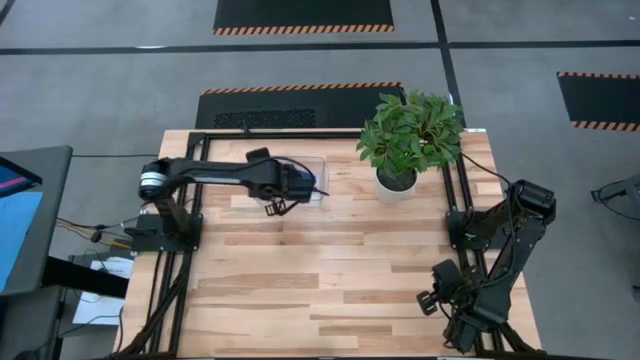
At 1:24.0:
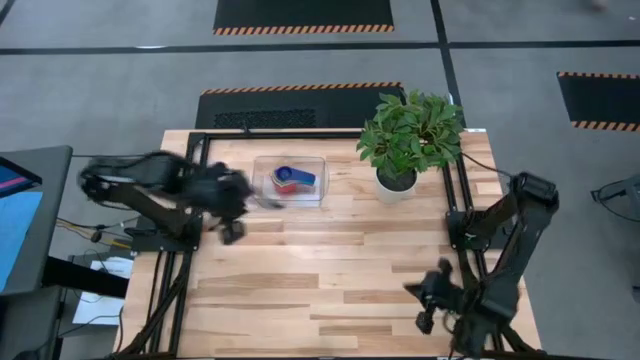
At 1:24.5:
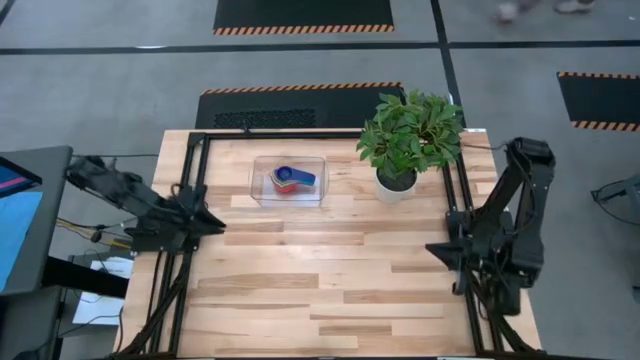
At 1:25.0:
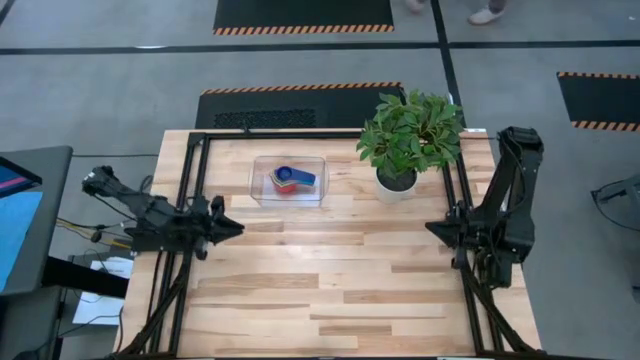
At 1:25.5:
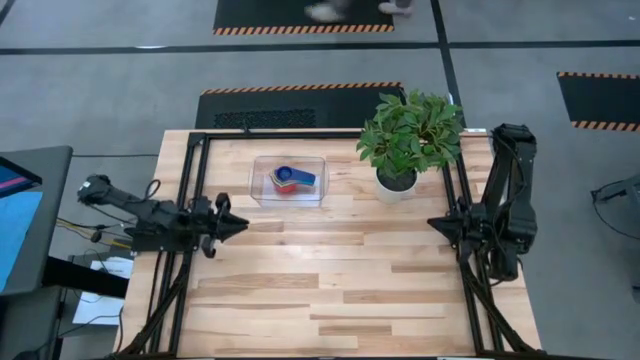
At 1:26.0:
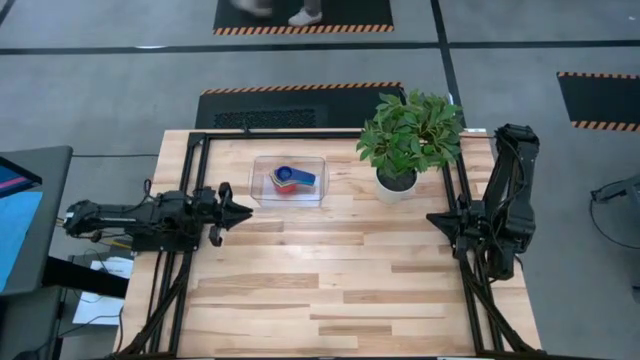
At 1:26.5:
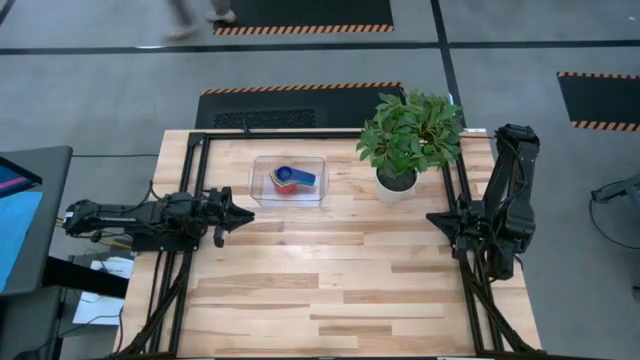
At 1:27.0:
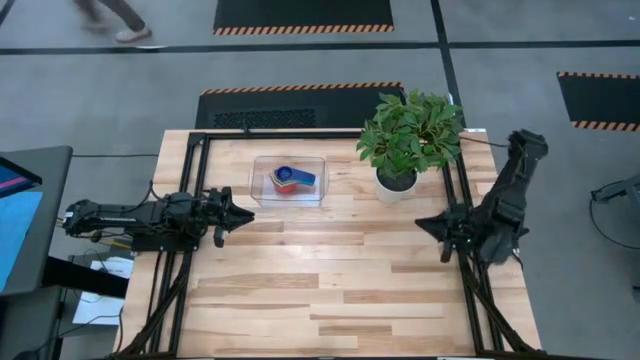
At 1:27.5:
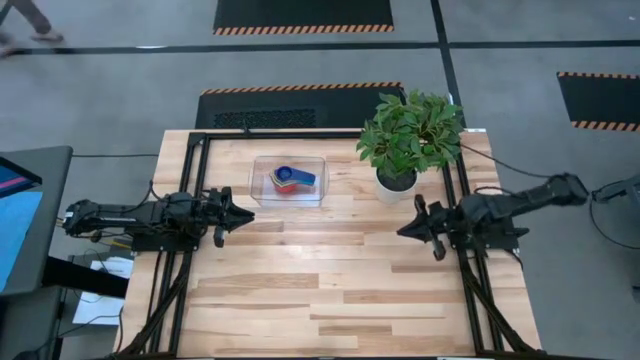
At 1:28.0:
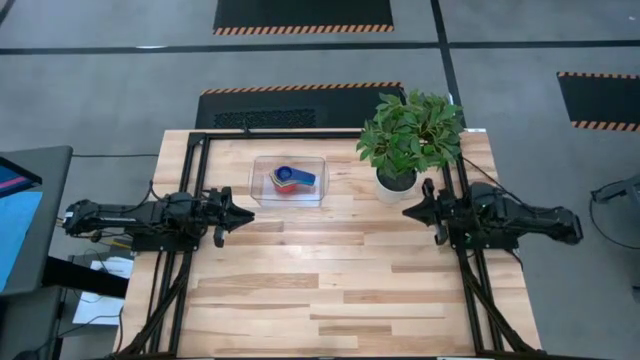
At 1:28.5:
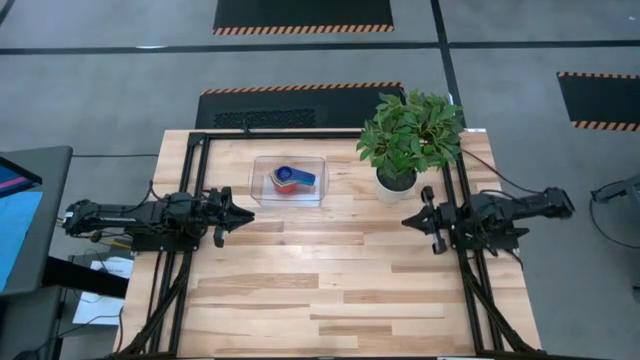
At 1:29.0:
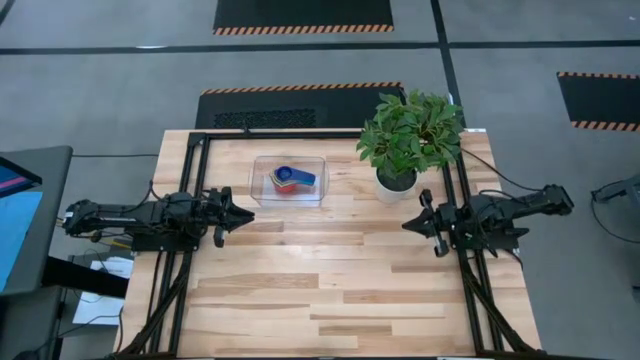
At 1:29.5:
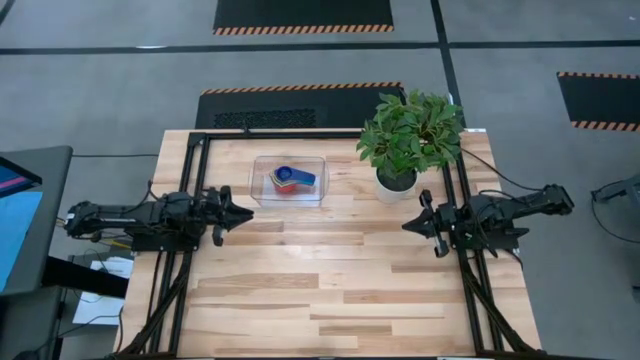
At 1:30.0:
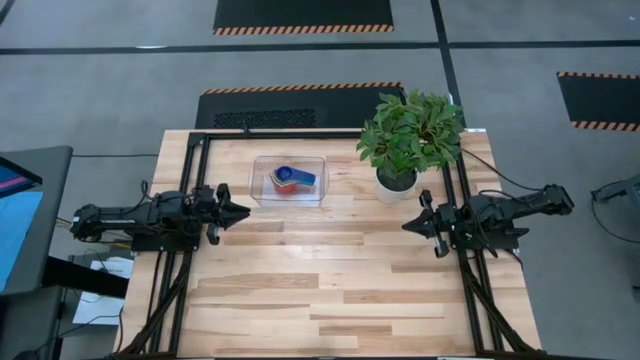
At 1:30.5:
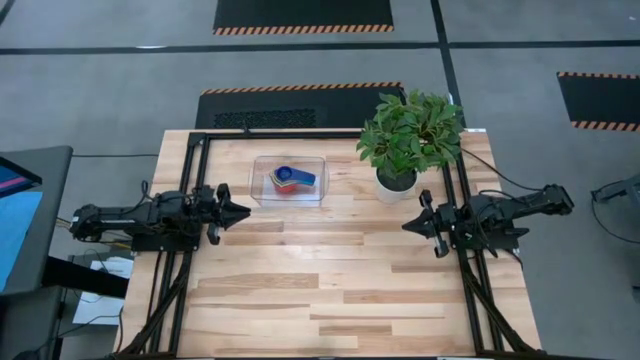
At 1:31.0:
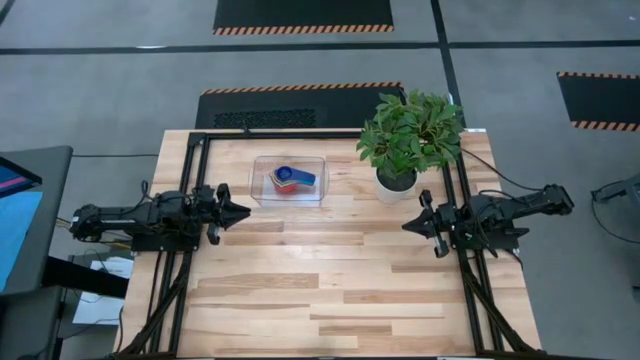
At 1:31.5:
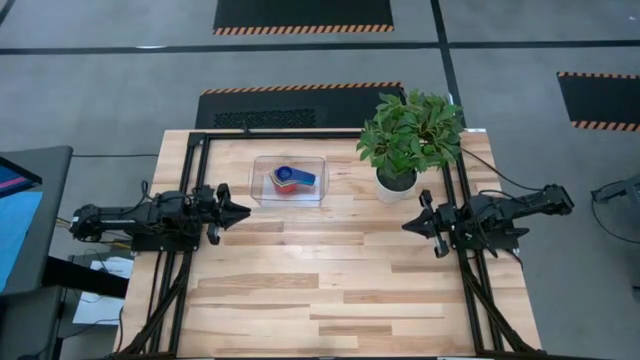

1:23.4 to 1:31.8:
Task: Nest measuring cups in basket
Return to Home Position

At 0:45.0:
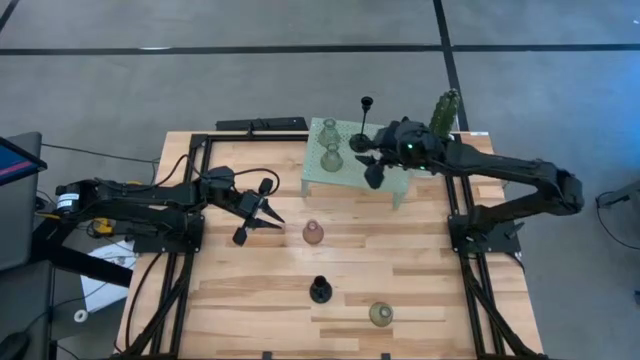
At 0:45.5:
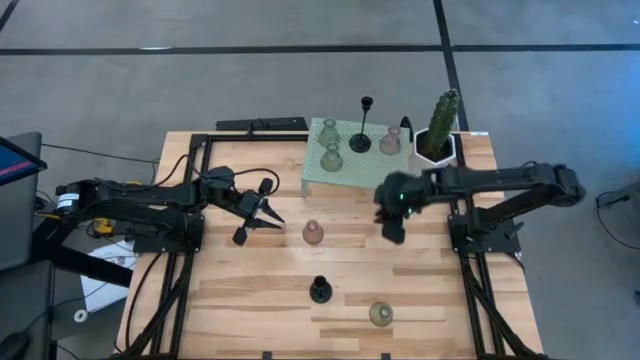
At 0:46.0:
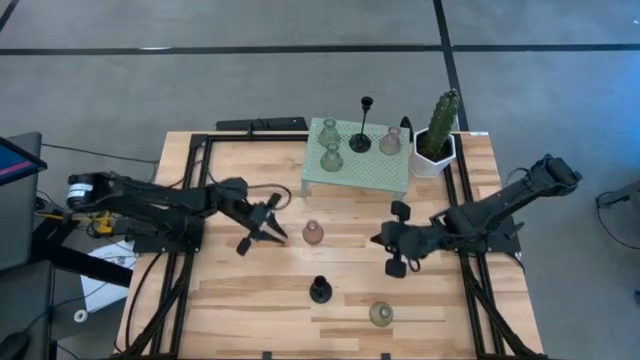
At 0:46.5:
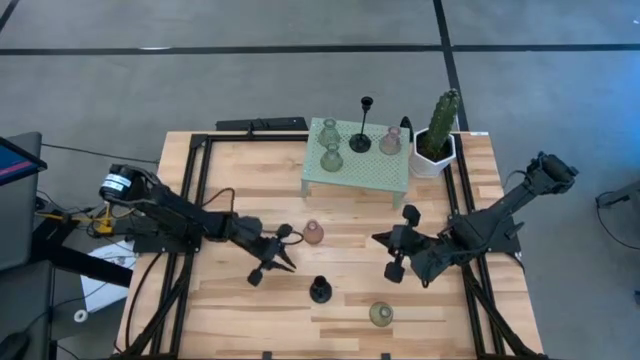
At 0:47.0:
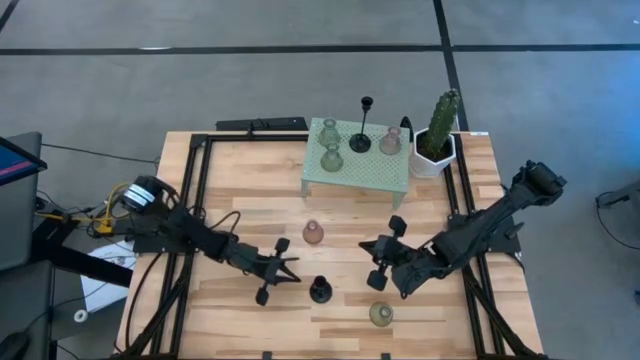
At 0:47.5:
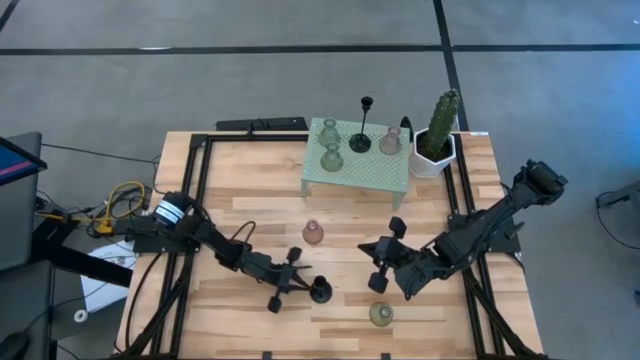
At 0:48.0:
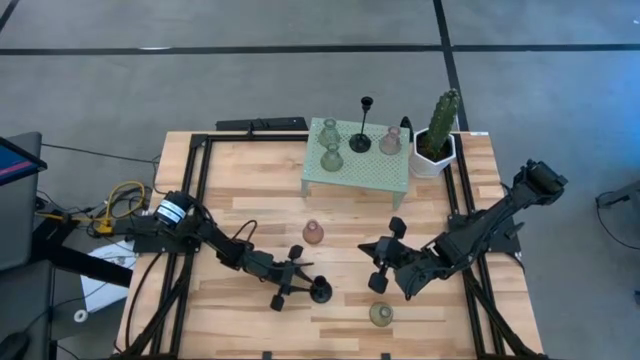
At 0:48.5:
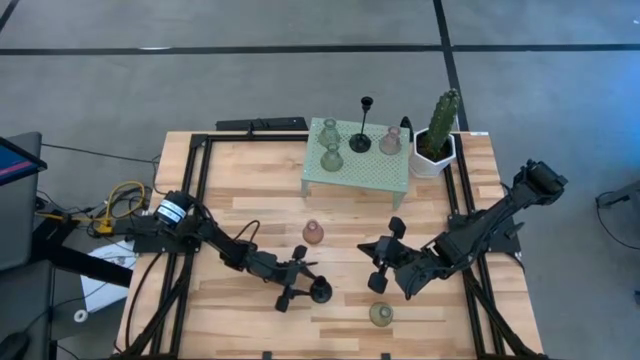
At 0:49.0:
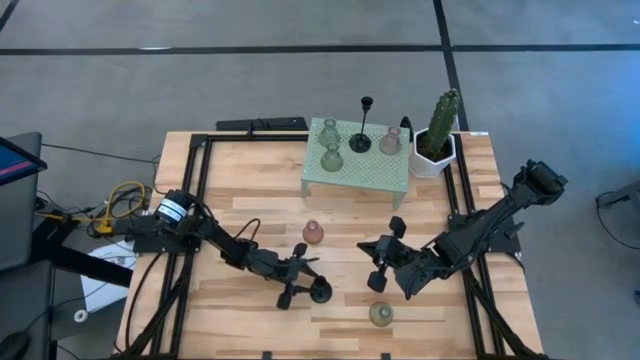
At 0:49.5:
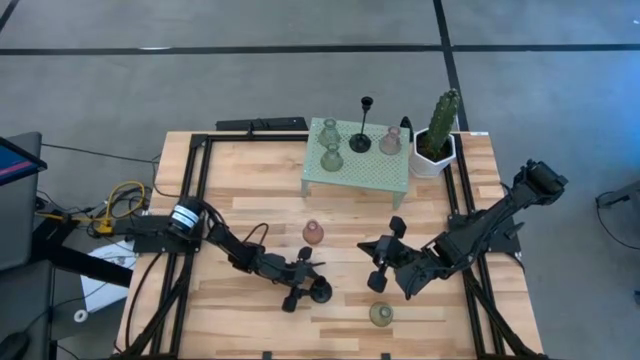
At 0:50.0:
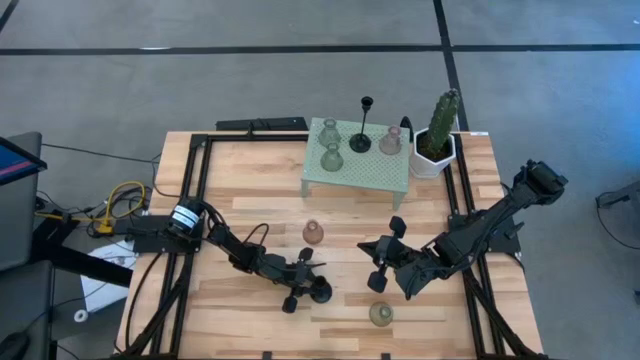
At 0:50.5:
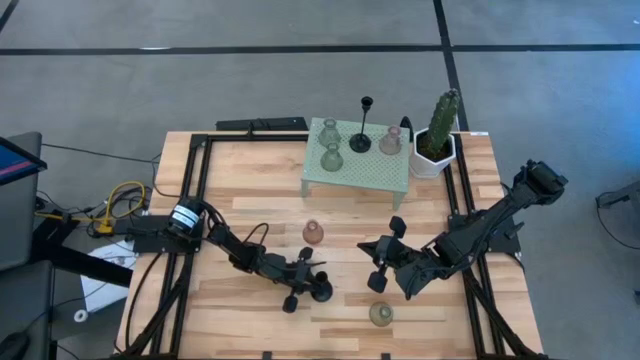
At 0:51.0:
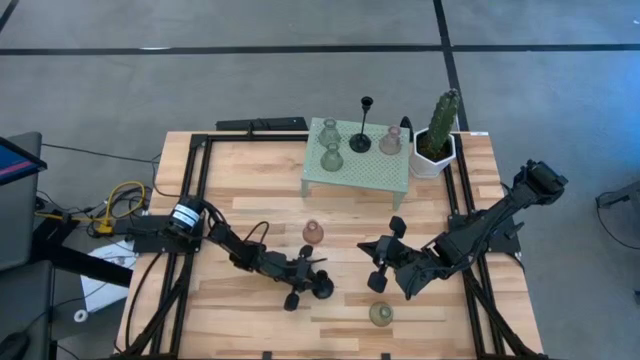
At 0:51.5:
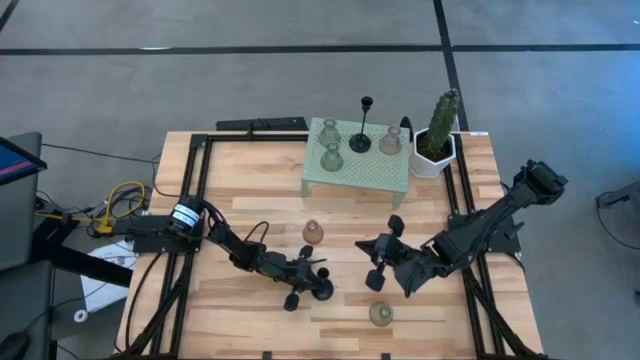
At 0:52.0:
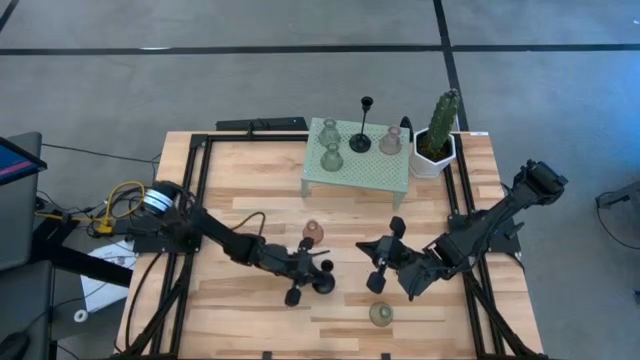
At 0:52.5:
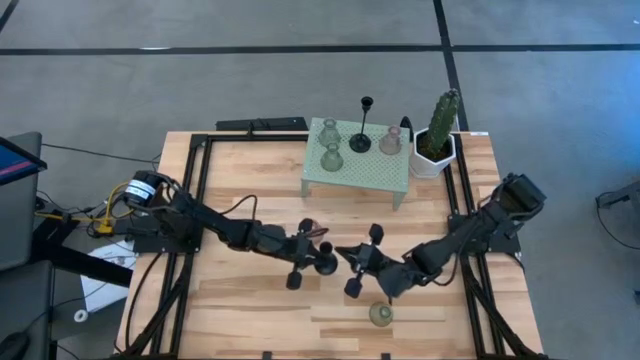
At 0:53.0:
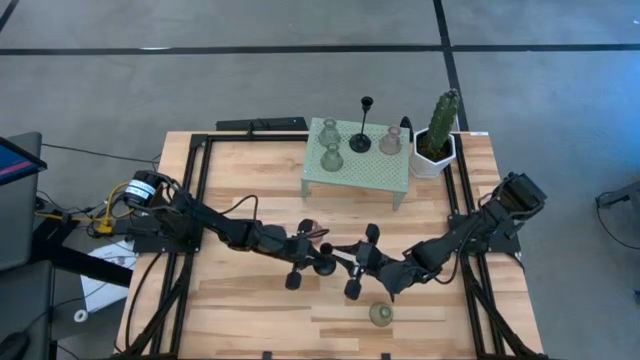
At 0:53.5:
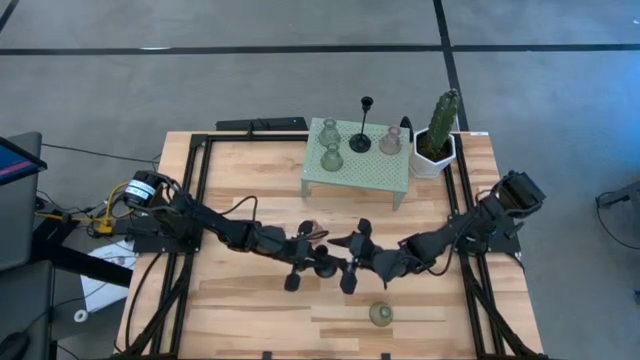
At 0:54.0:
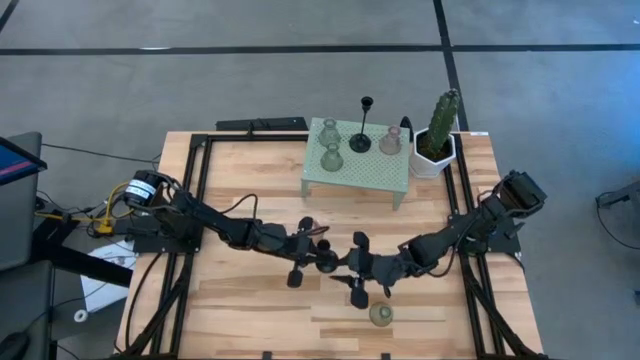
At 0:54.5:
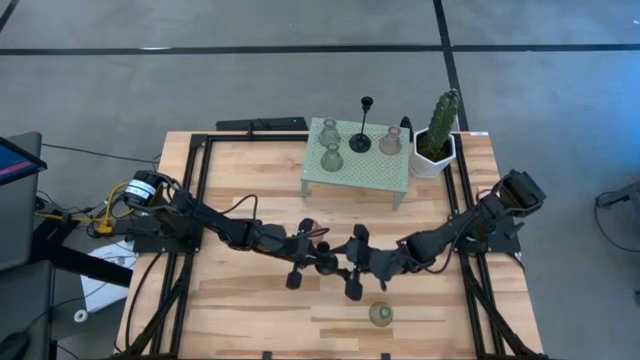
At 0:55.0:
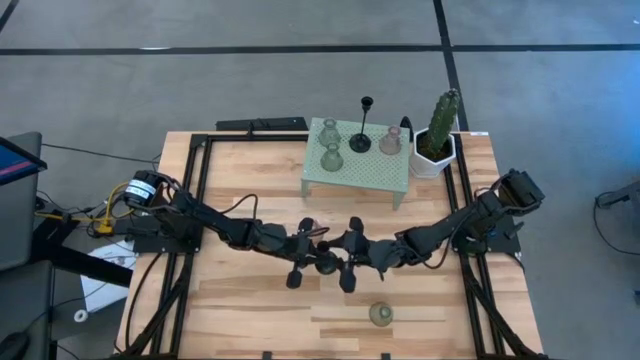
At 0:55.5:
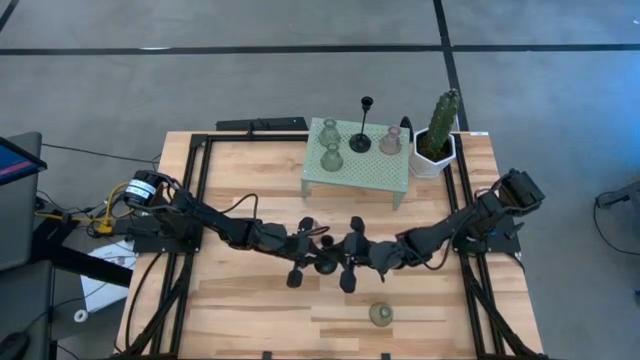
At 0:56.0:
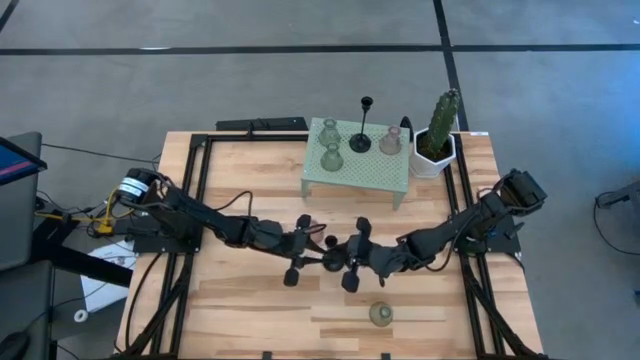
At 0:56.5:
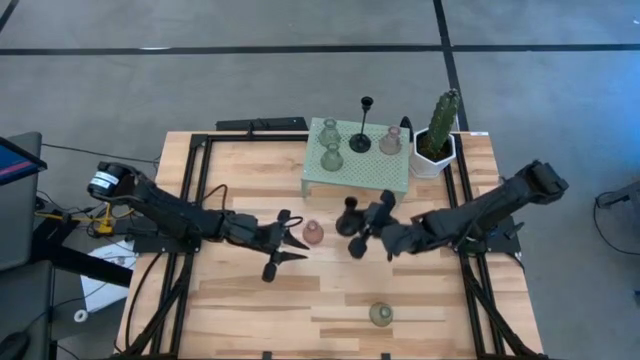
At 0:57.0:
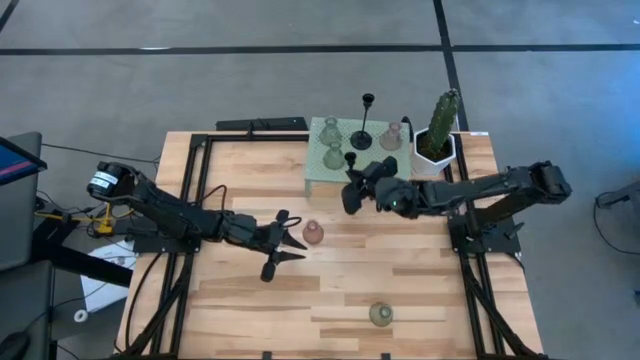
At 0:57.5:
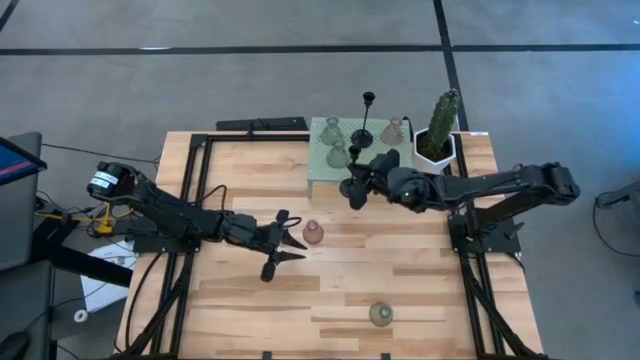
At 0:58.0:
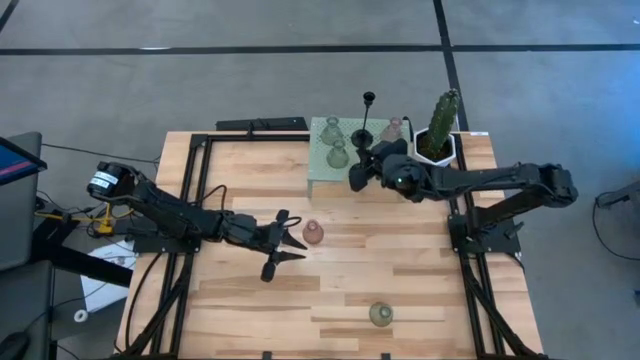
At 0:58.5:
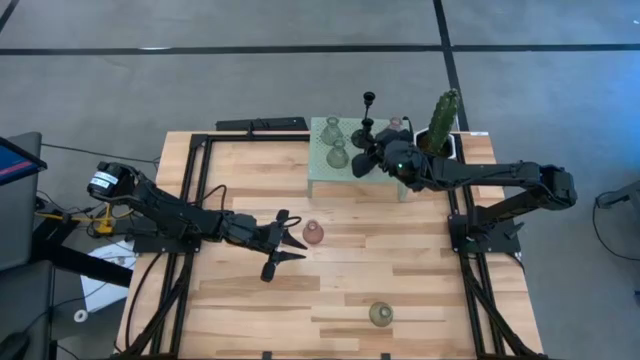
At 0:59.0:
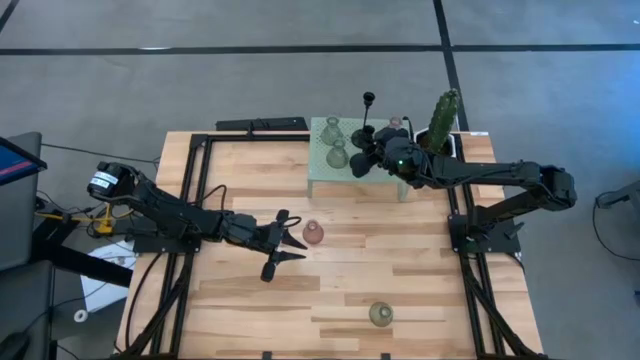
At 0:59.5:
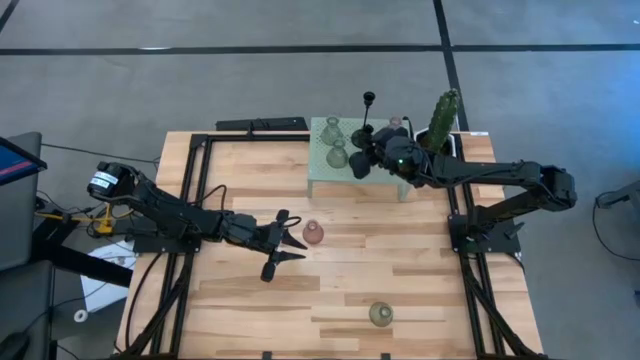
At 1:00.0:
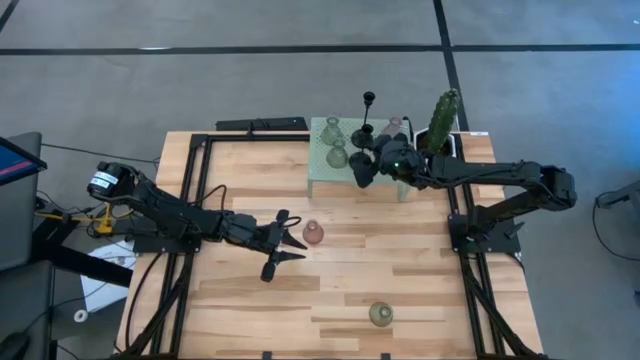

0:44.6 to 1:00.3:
Task: Pick & Place candle stick holders
Put the black candle holder on the shelf aligned with the other black candle holder
